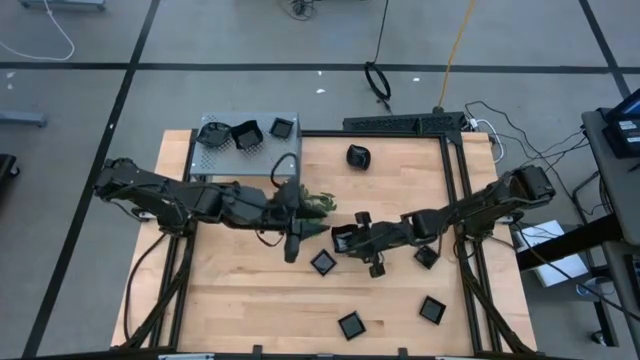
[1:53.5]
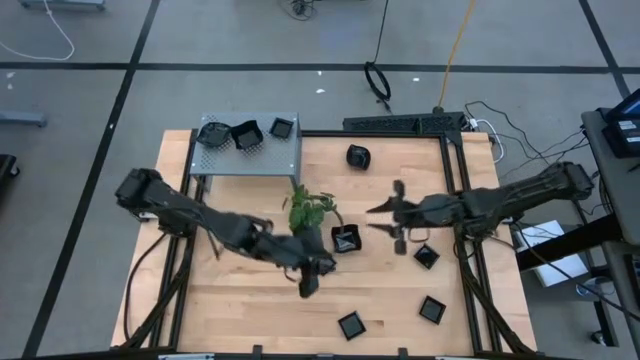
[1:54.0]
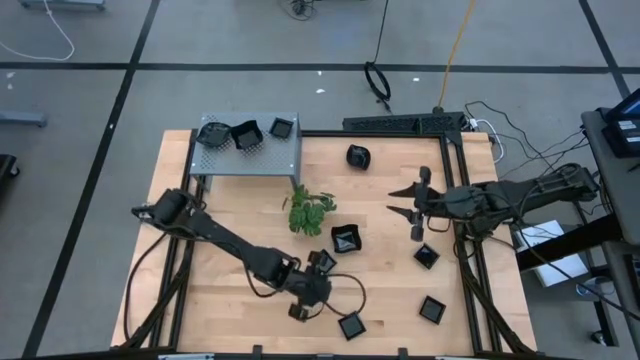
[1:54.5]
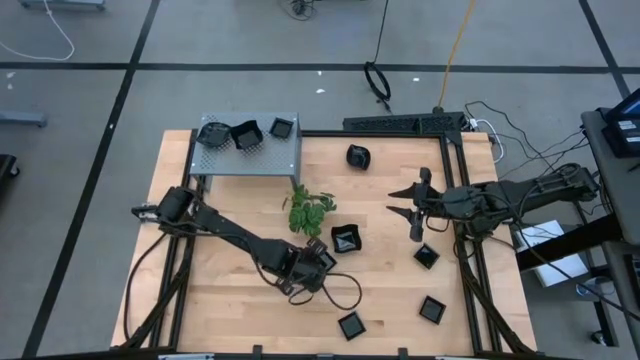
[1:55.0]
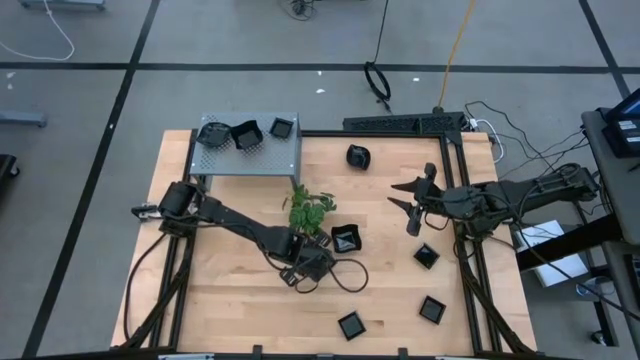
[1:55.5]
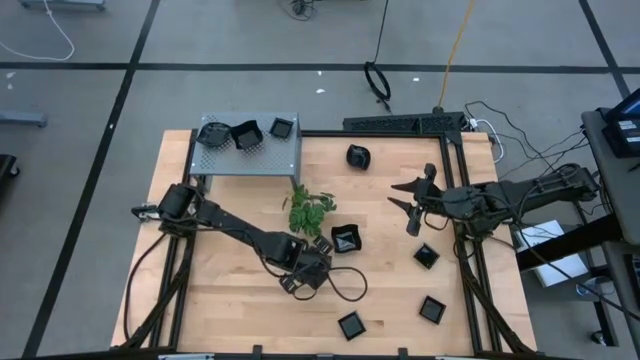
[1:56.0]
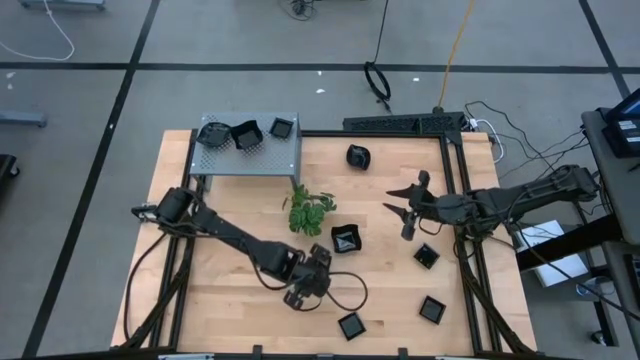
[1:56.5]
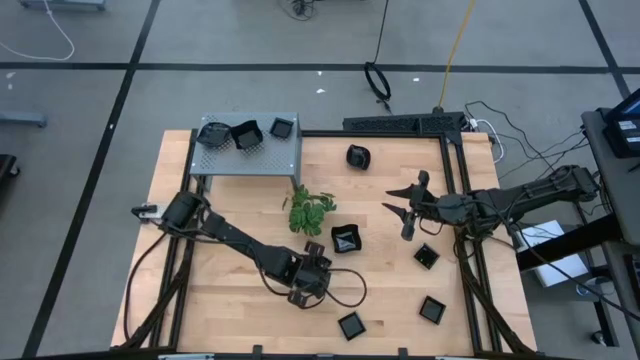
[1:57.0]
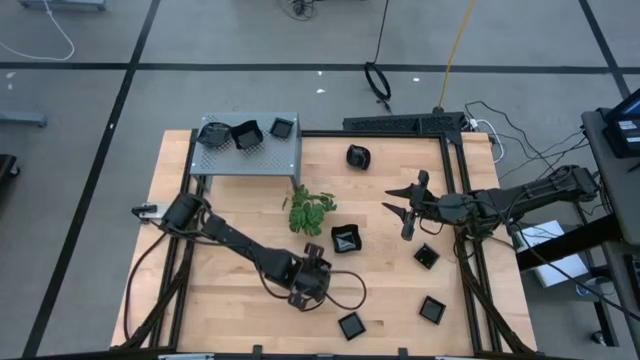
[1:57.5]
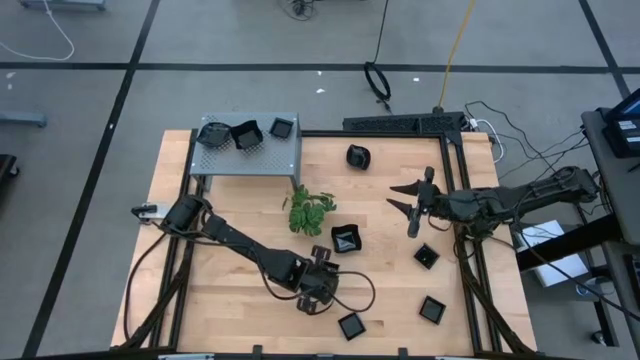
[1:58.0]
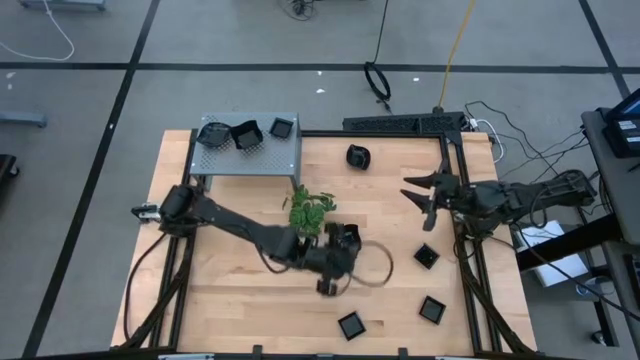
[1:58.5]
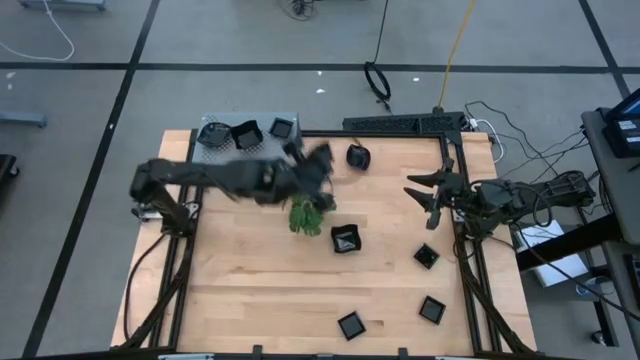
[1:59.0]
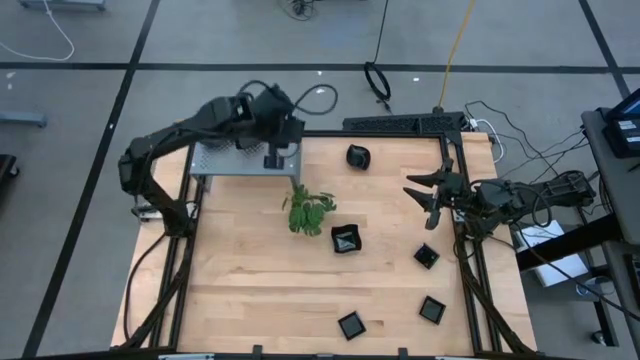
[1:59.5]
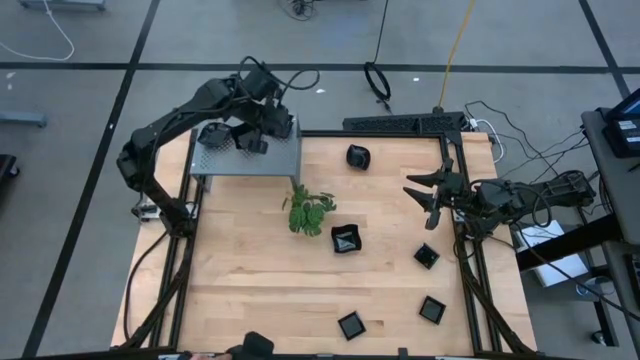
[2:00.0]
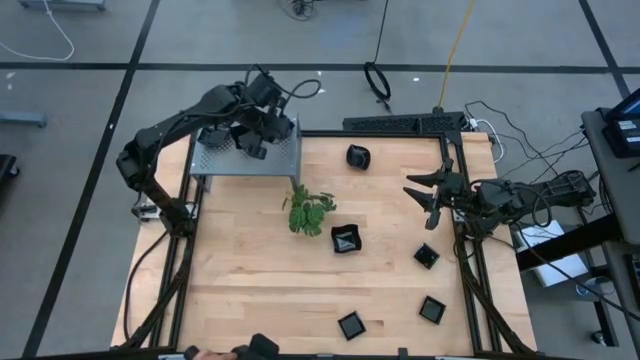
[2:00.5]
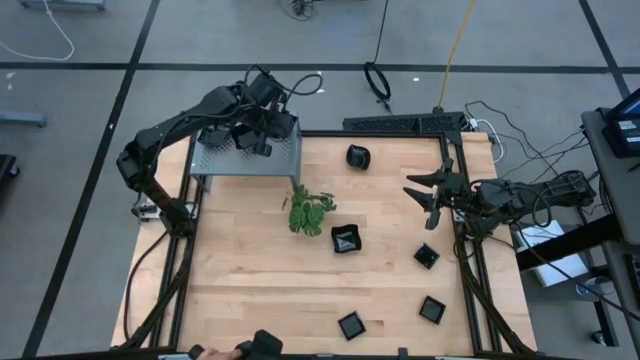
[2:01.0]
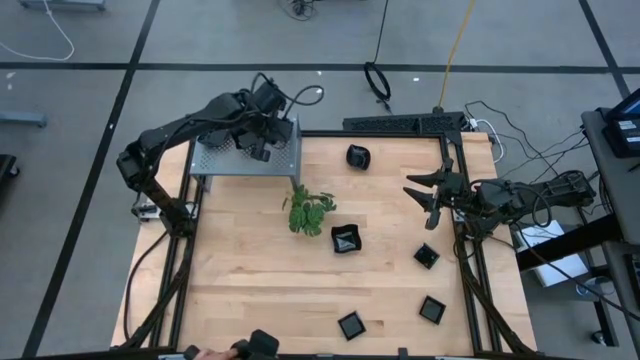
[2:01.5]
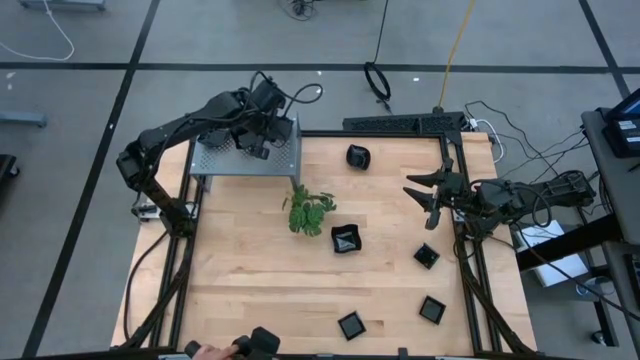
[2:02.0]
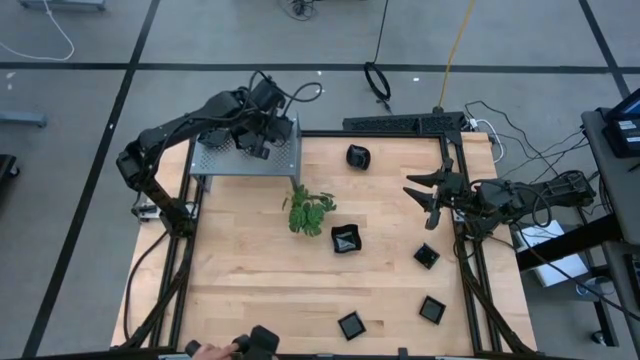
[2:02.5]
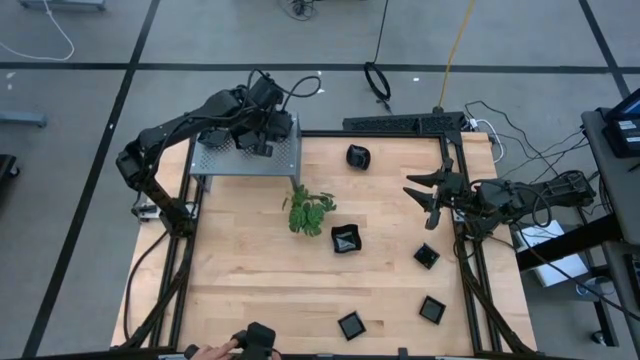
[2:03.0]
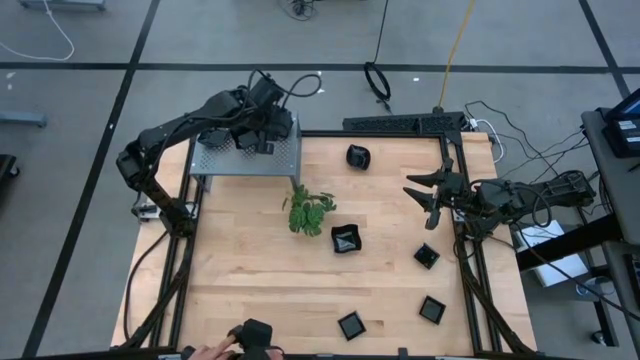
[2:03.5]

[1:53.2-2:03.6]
Task: Pick & Place Mini shaped plates
Stack the square plate on top of the square plate on the shelf

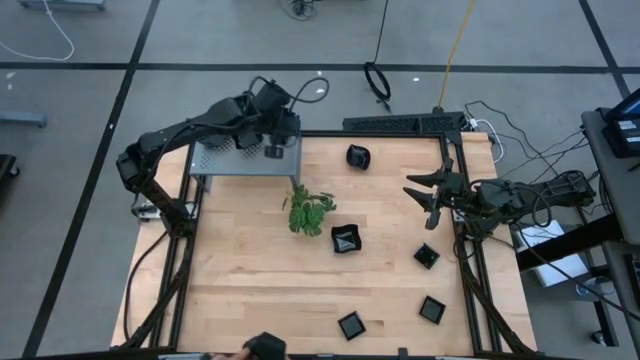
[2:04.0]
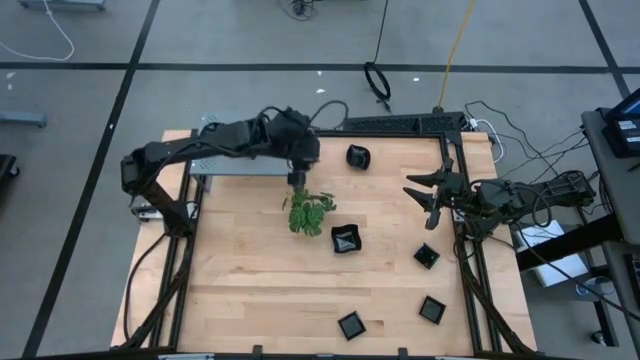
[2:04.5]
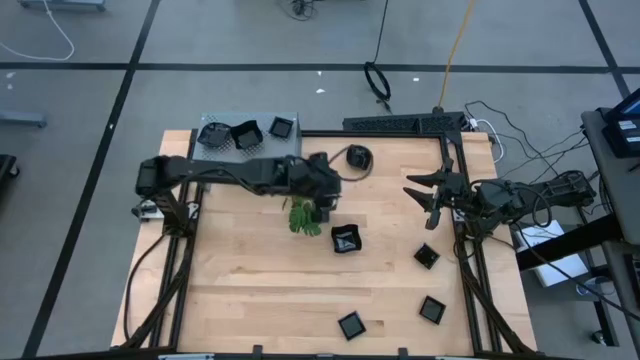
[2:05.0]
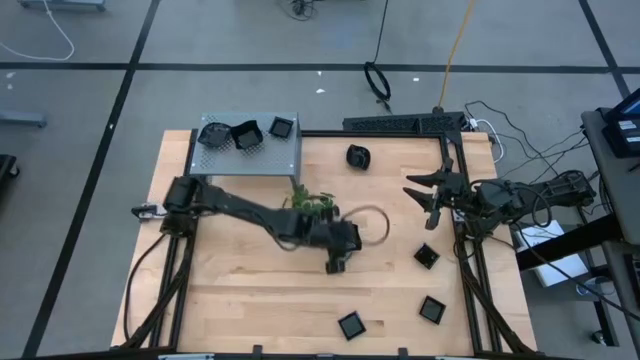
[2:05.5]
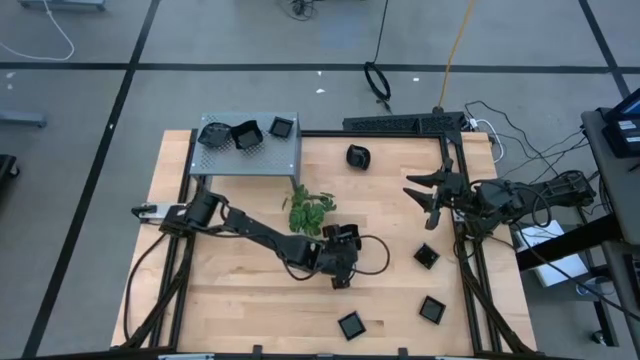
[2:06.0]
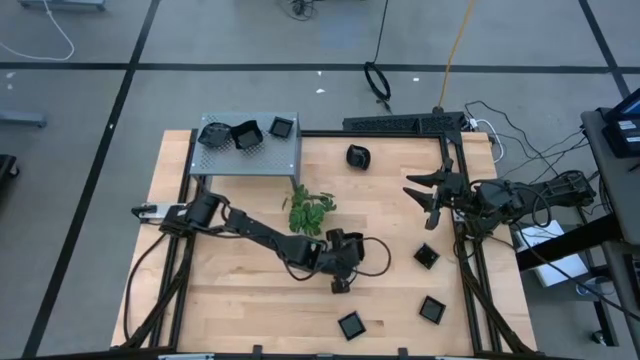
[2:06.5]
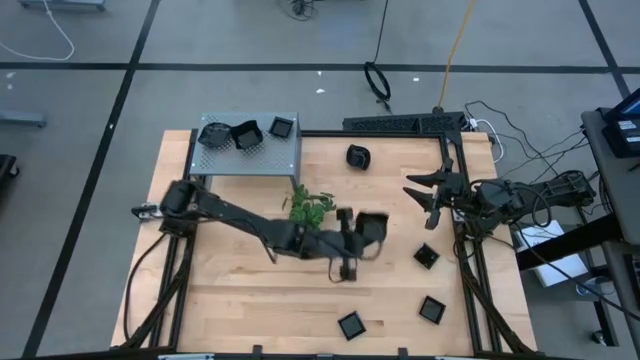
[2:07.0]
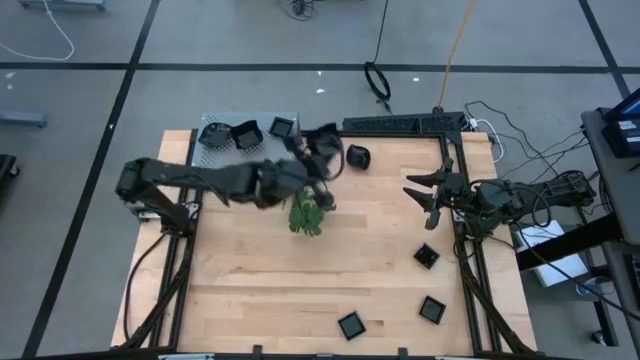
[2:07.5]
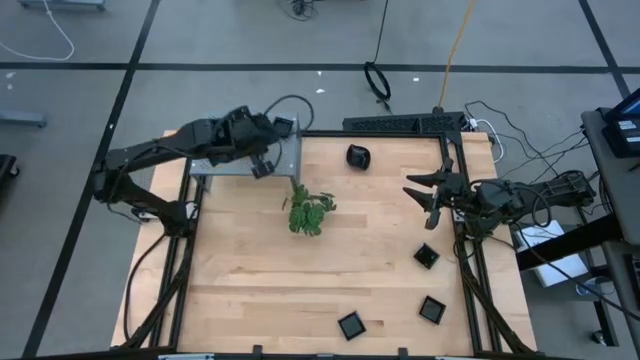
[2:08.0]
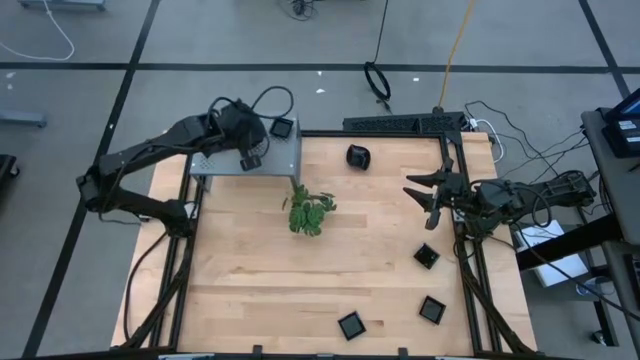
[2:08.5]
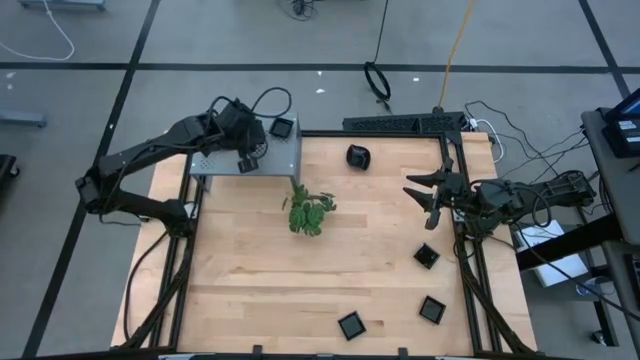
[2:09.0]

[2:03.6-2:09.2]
Stack the distorted square plate on top of the distorted square plate on the shelf
